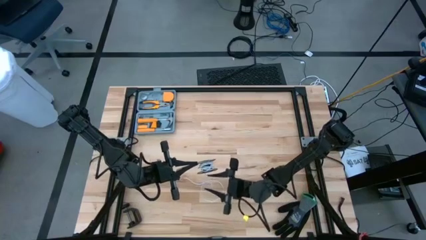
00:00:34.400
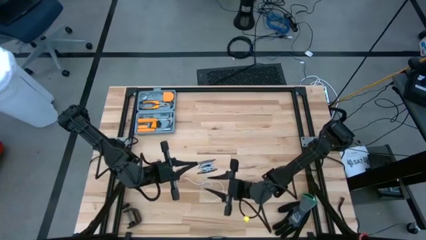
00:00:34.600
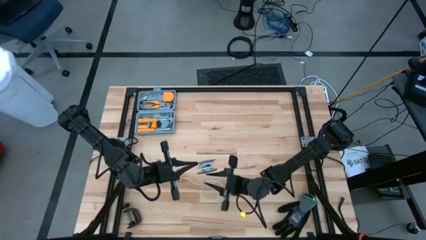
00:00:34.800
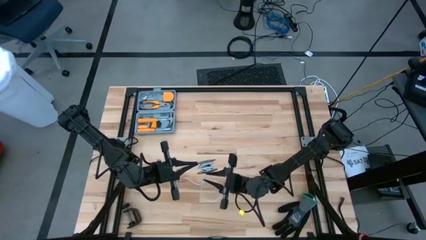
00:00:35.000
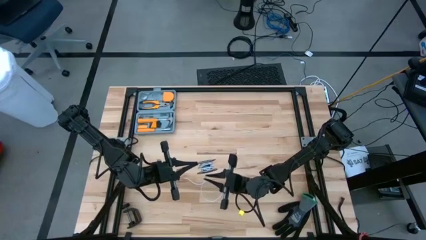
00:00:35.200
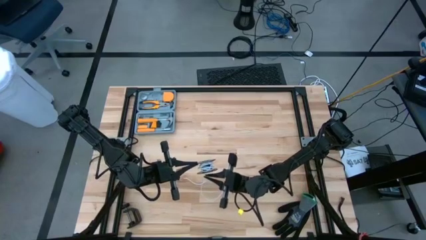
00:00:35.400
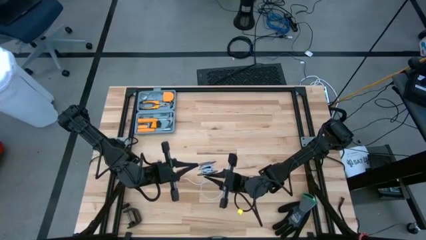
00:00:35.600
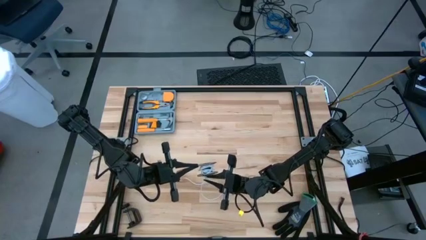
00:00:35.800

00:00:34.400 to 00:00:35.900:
Task: Coil cords
Uncoil the white wire from the spool

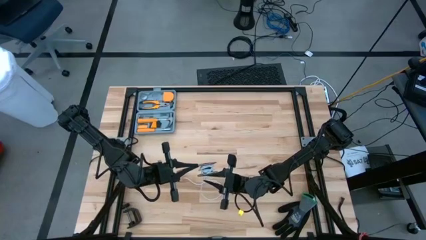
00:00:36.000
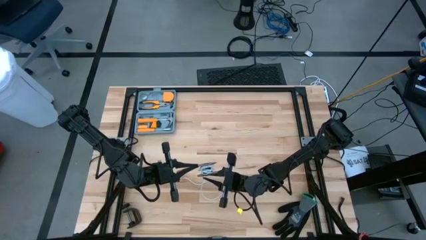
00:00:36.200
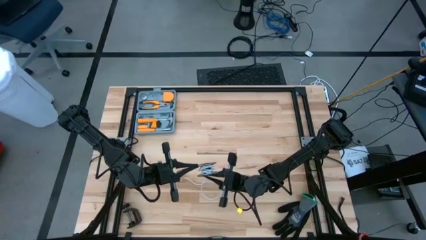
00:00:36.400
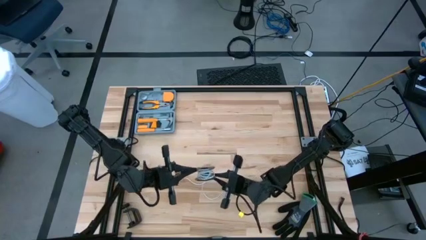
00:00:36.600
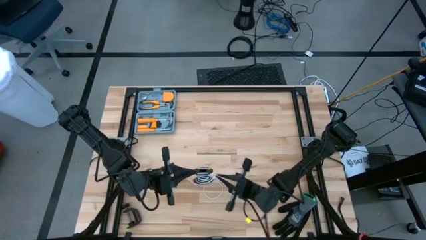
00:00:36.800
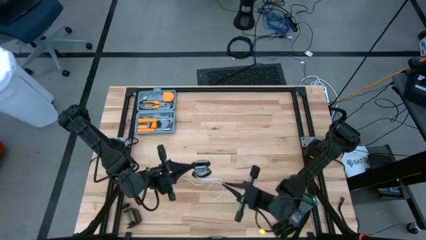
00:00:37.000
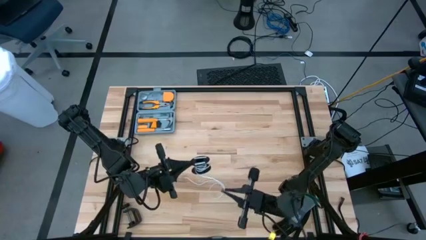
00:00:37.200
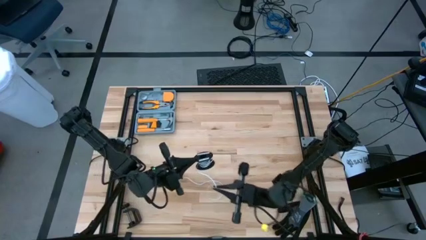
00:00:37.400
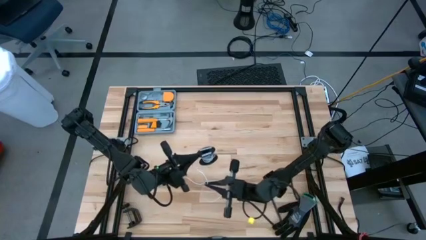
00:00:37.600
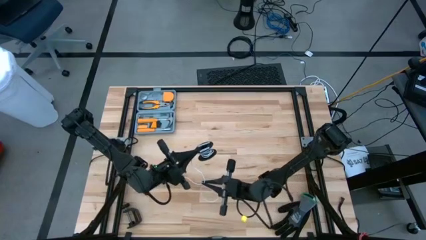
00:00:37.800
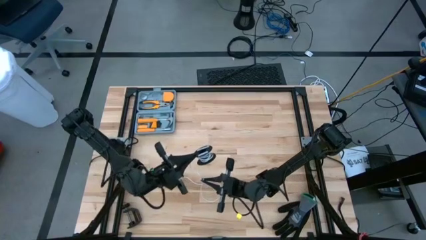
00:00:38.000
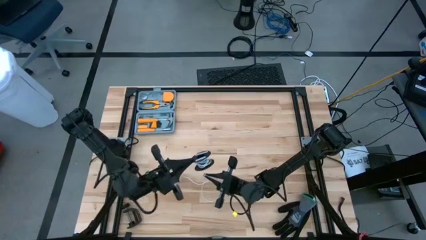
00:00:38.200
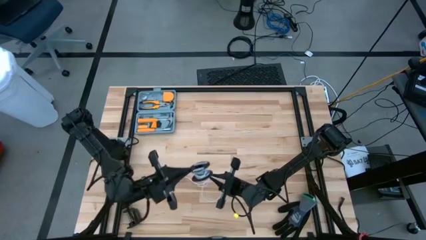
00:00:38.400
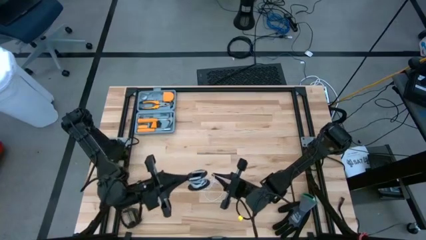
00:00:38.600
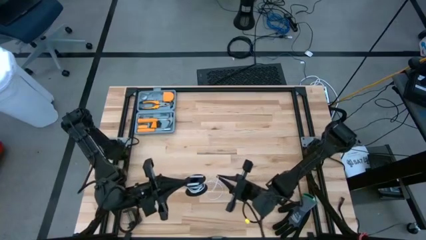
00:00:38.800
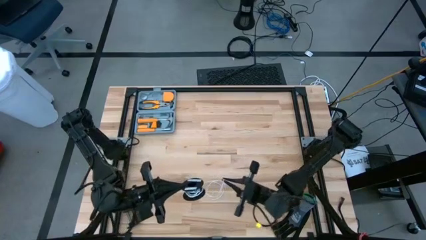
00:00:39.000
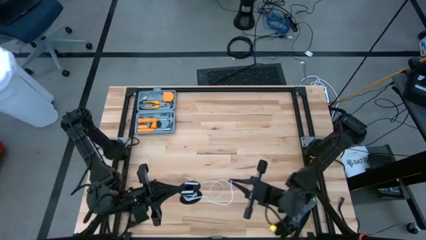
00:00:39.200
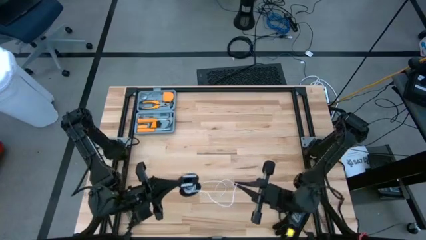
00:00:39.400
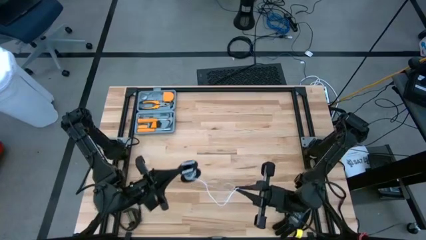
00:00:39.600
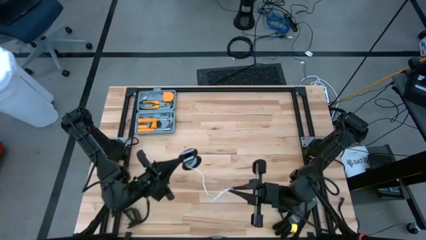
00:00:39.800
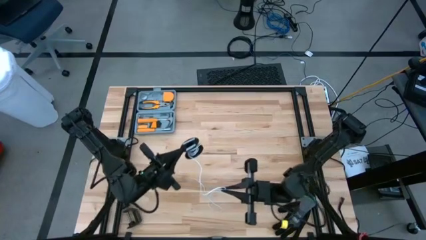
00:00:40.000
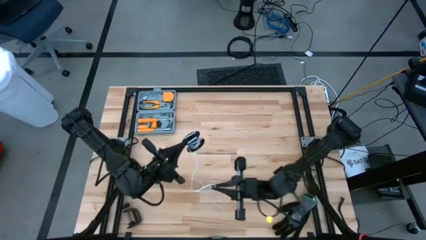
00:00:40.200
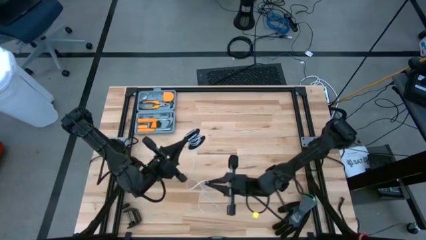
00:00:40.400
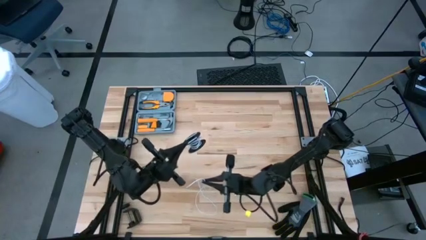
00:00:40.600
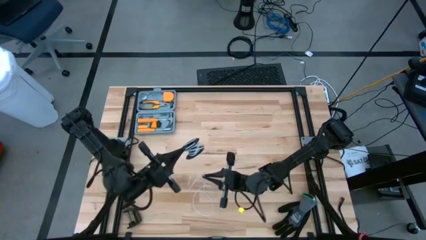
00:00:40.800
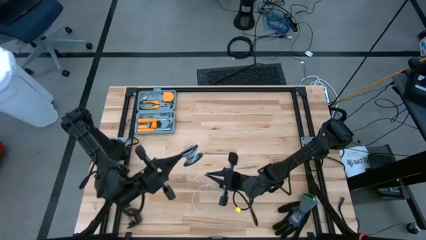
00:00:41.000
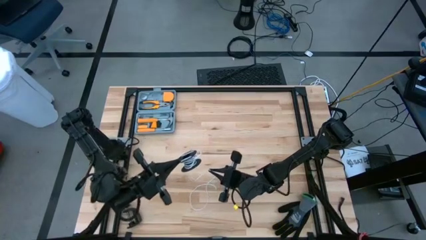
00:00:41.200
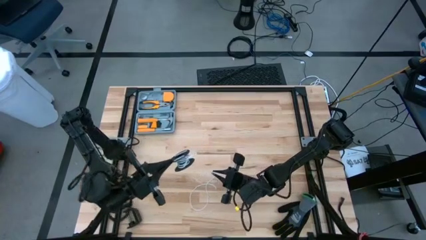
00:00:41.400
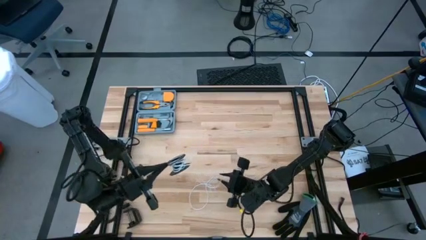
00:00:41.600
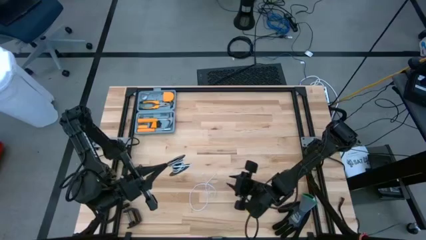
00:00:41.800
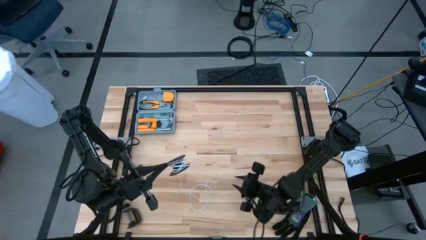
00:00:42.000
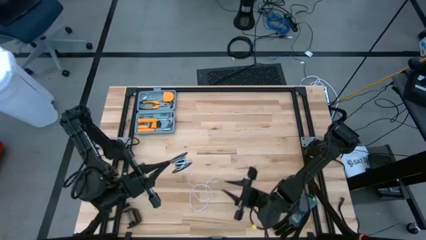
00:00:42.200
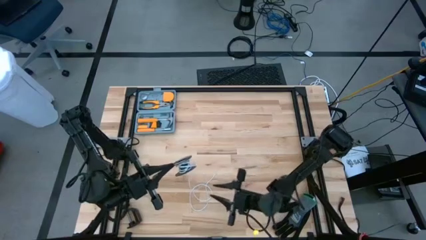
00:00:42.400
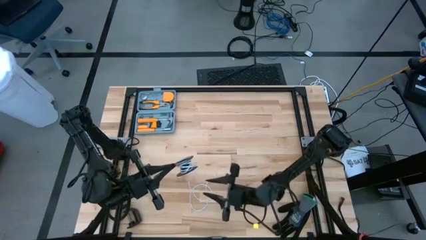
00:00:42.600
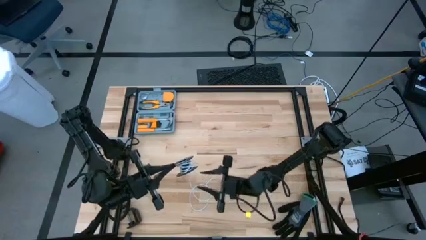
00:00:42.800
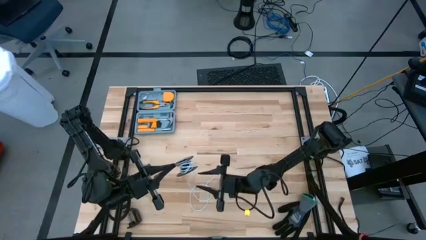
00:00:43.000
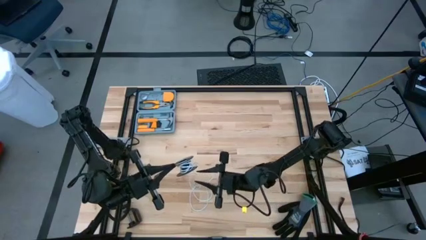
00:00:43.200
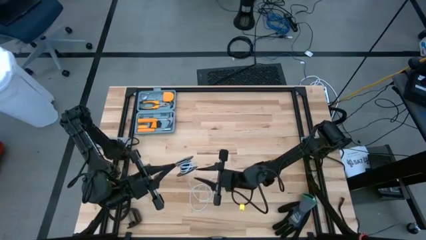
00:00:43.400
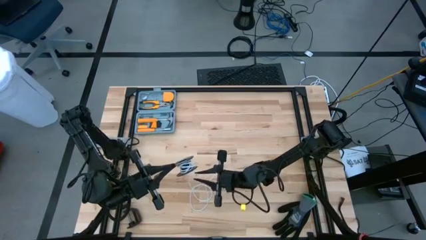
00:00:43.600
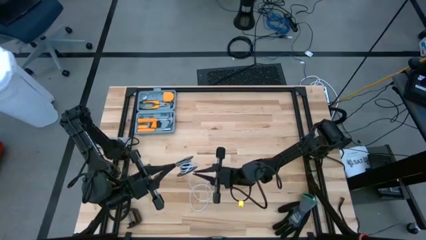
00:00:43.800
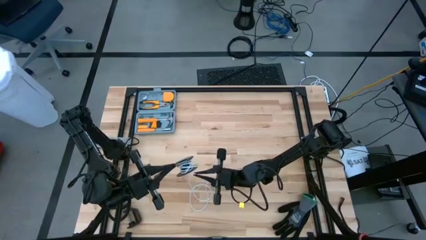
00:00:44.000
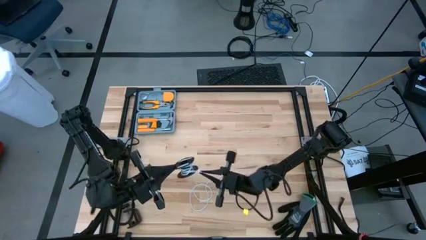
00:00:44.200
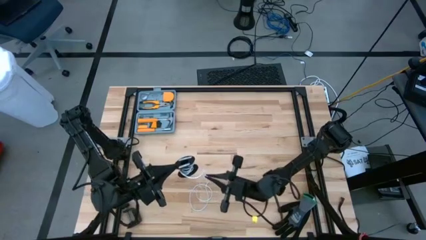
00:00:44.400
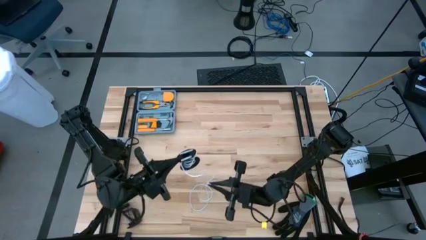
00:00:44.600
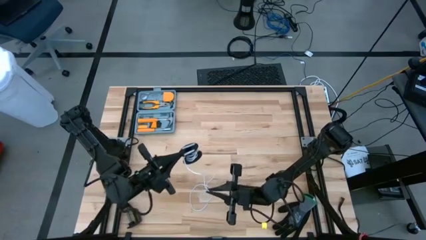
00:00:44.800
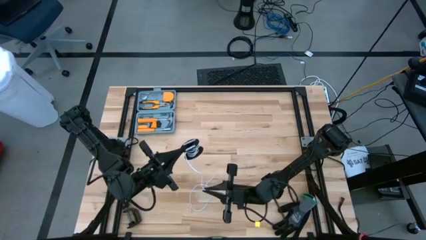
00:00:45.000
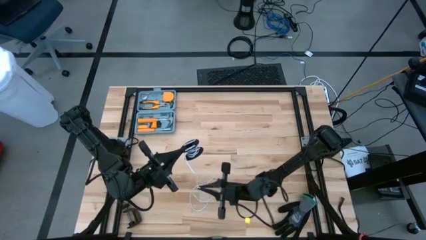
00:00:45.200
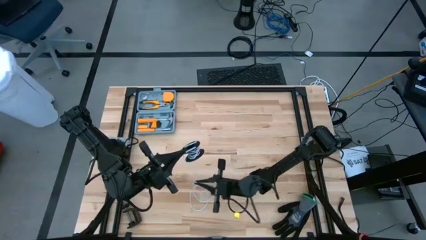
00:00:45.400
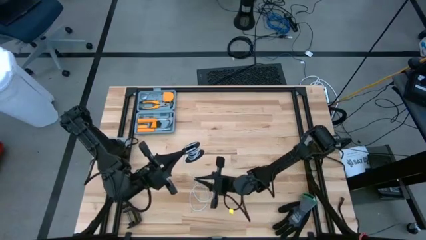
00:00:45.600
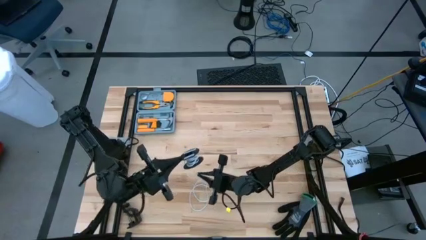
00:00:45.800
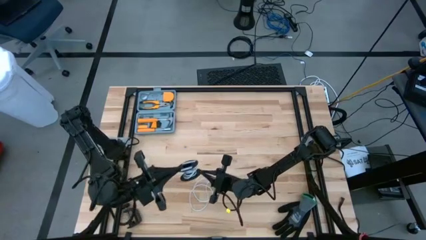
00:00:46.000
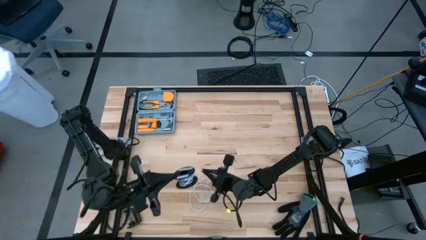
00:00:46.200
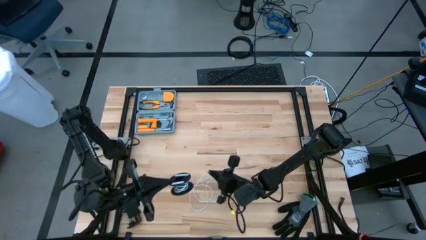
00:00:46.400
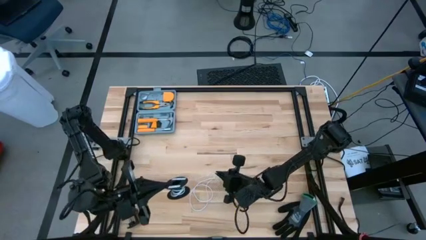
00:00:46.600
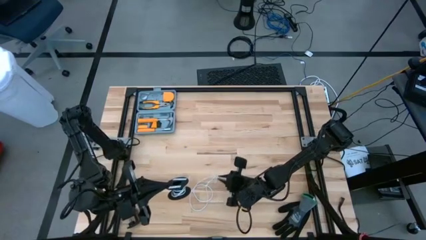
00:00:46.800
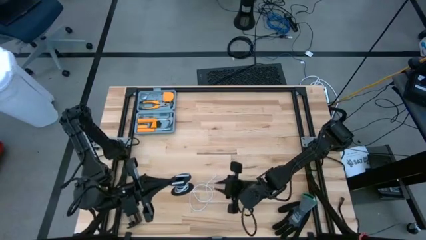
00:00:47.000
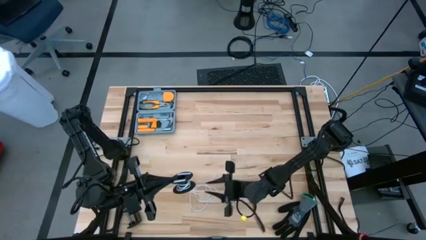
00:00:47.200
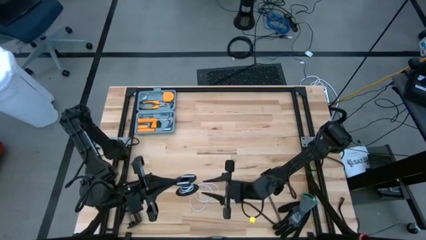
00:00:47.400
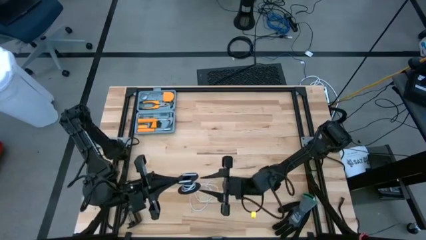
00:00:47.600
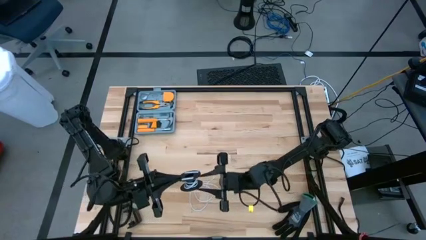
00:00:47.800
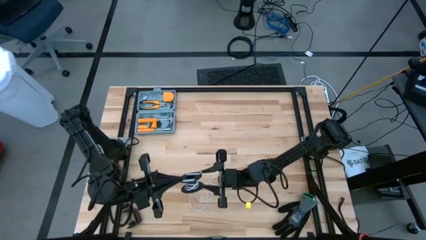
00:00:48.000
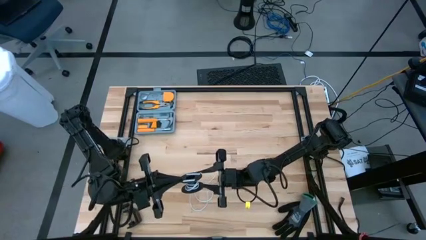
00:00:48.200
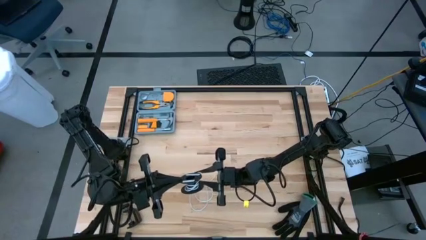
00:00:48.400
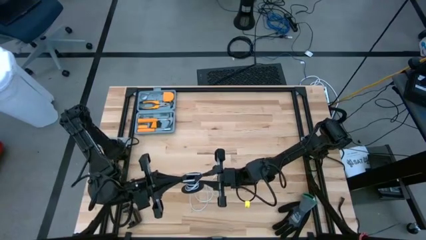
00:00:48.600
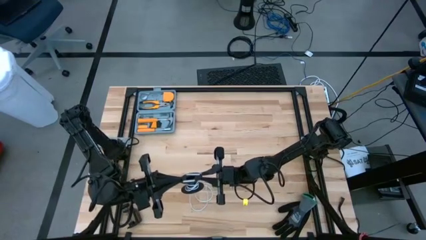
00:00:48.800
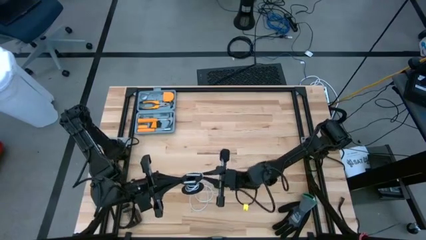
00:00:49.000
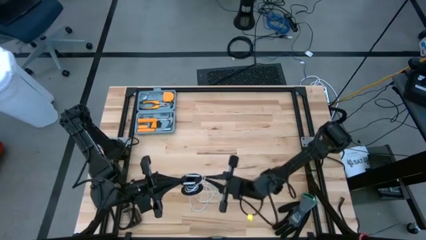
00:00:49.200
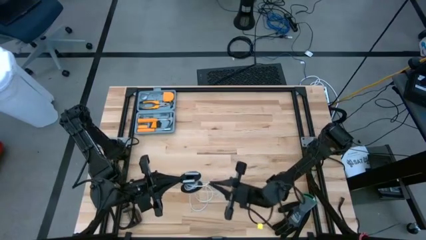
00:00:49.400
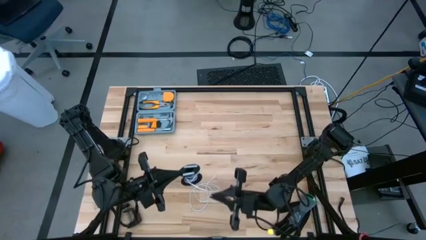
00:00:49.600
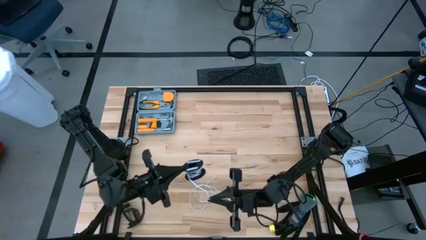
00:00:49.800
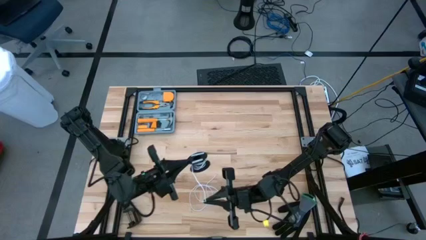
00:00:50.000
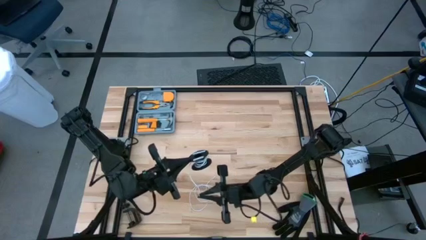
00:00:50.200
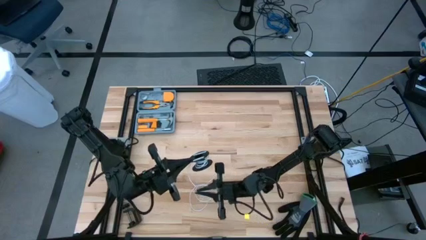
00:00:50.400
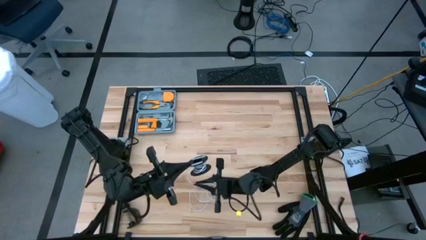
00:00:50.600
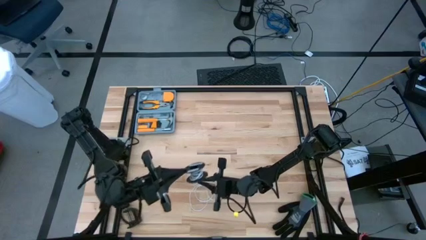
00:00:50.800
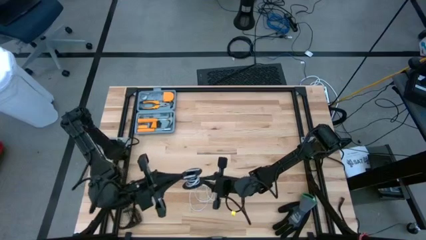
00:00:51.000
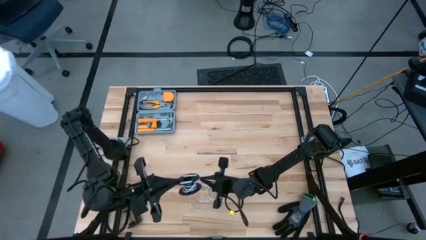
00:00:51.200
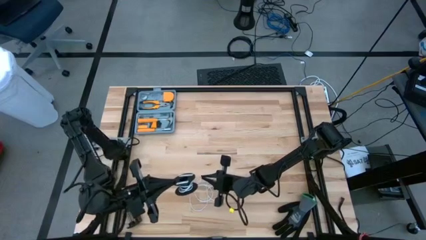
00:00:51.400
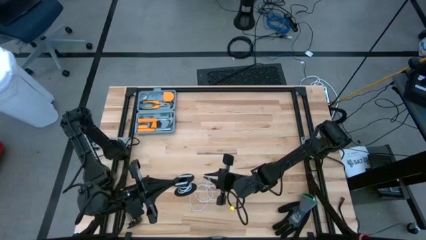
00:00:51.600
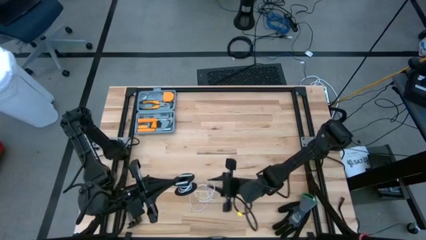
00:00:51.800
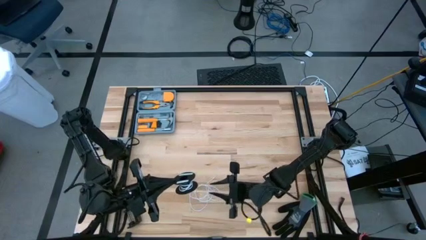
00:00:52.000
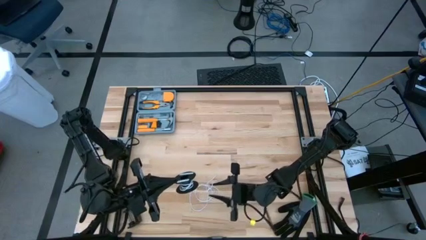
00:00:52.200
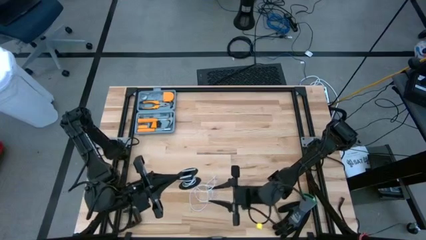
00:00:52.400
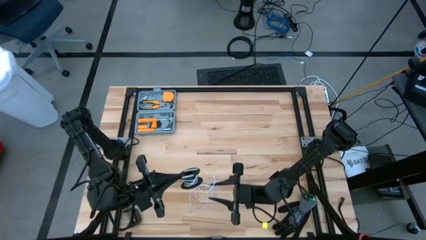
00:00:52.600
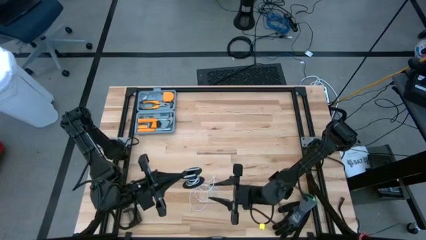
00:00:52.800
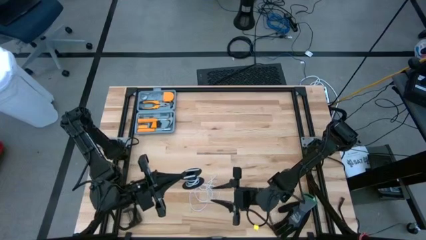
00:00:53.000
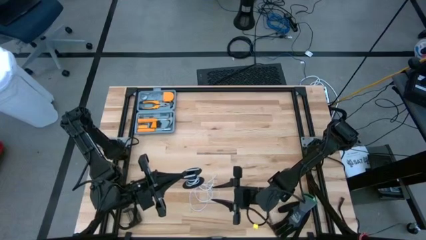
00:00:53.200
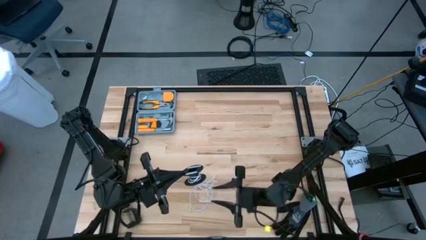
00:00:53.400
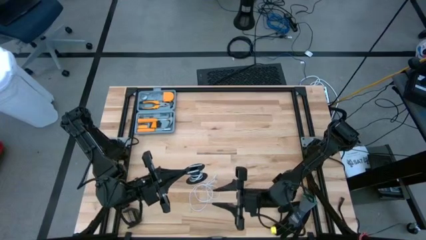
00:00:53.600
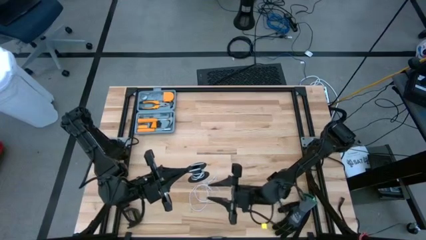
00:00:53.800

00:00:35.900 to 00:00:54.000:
Uncoil the white wire from the spool
